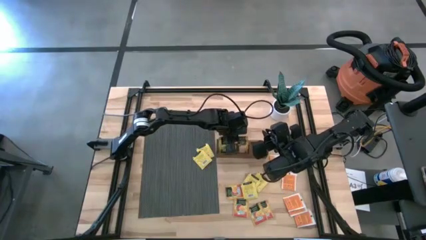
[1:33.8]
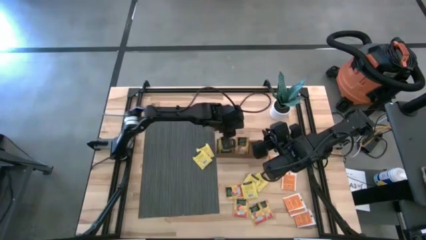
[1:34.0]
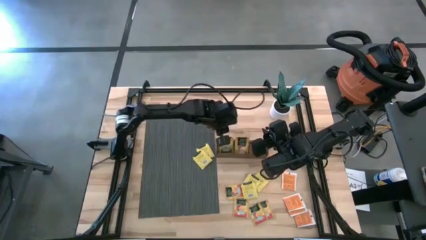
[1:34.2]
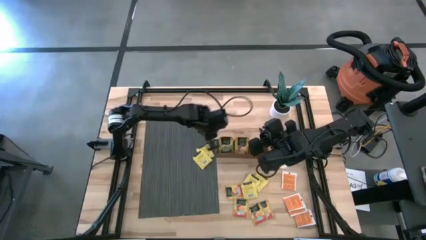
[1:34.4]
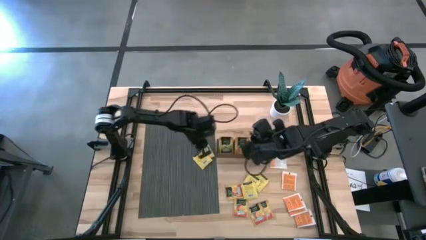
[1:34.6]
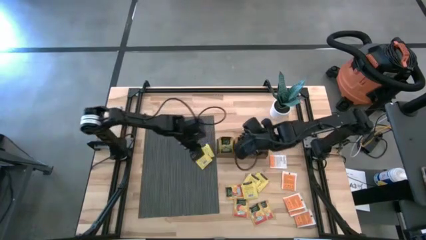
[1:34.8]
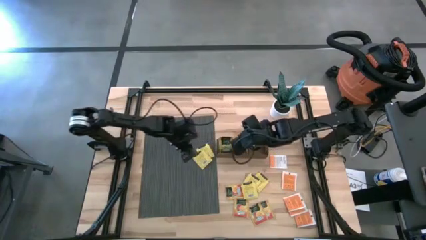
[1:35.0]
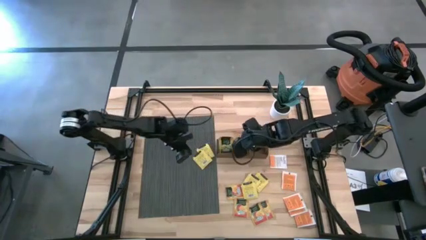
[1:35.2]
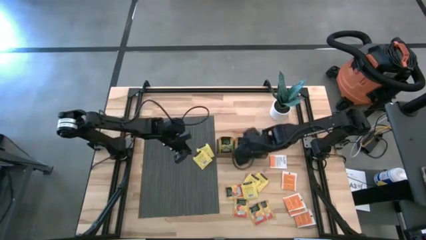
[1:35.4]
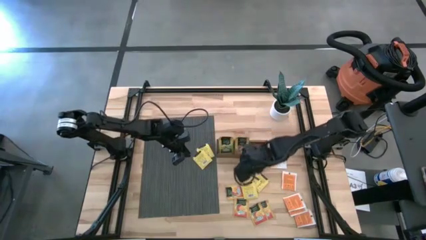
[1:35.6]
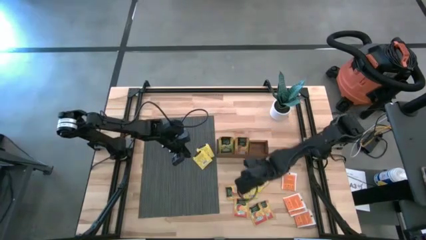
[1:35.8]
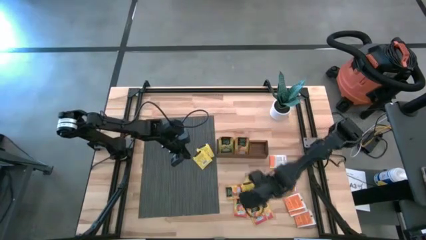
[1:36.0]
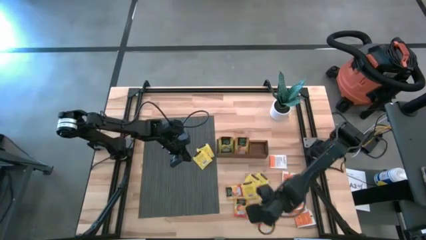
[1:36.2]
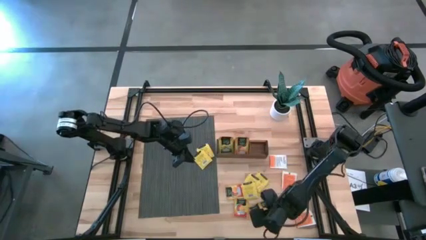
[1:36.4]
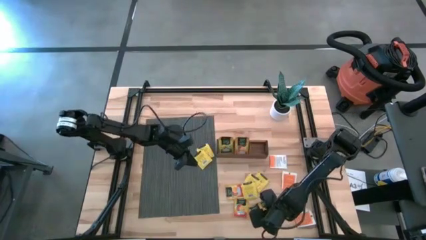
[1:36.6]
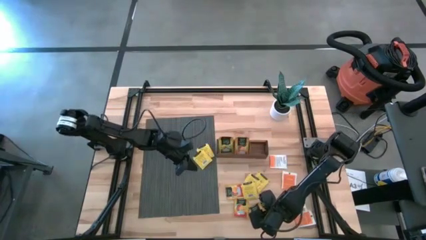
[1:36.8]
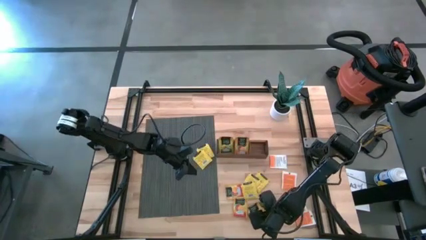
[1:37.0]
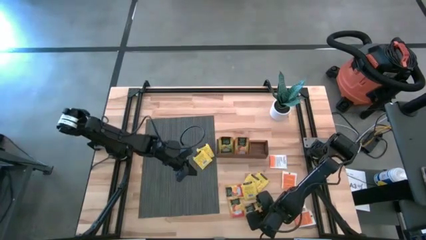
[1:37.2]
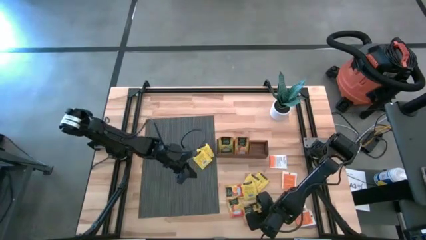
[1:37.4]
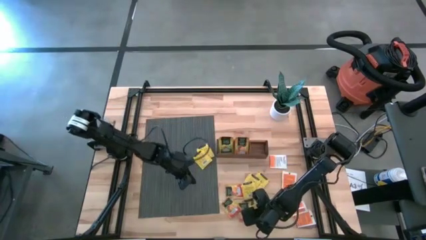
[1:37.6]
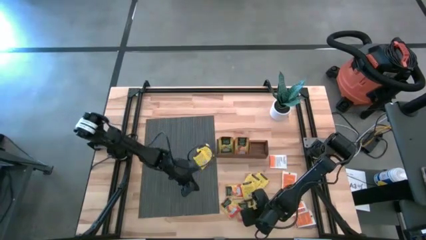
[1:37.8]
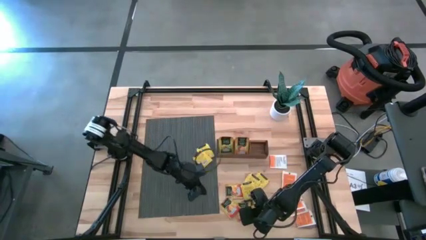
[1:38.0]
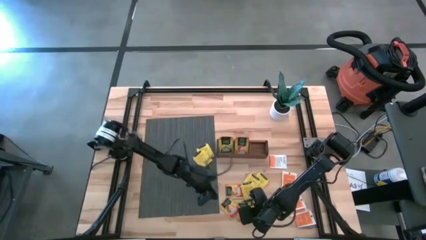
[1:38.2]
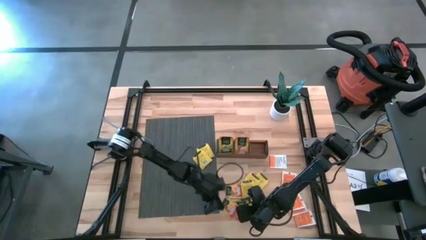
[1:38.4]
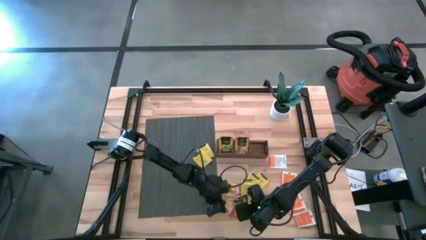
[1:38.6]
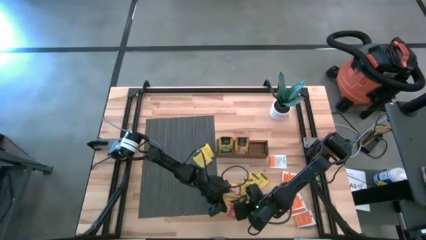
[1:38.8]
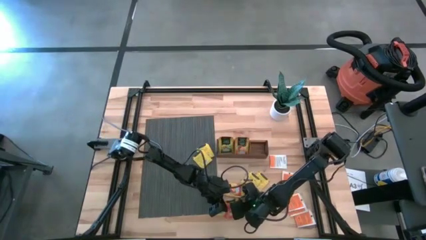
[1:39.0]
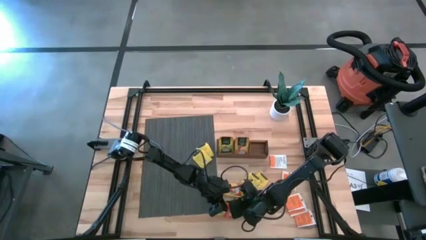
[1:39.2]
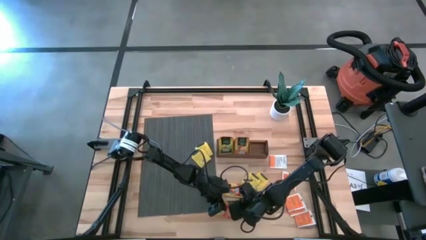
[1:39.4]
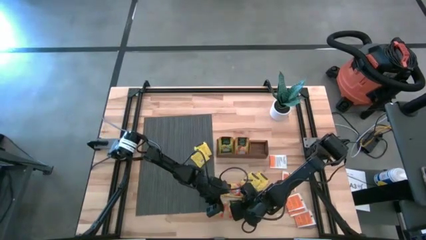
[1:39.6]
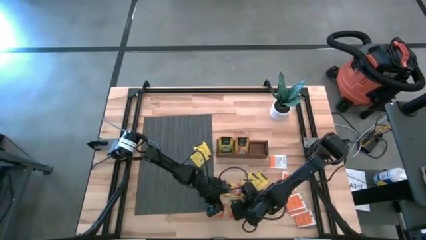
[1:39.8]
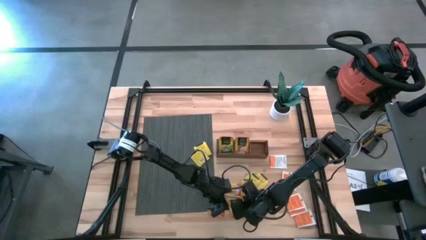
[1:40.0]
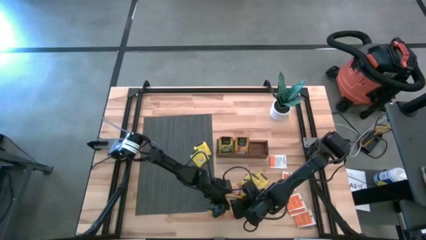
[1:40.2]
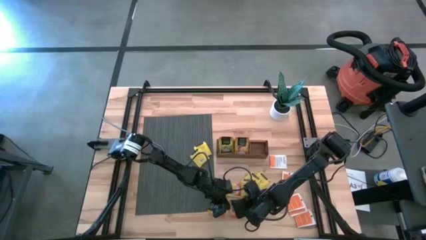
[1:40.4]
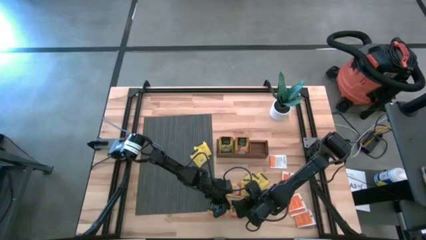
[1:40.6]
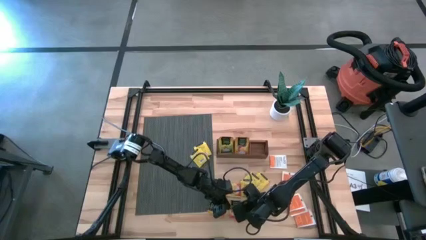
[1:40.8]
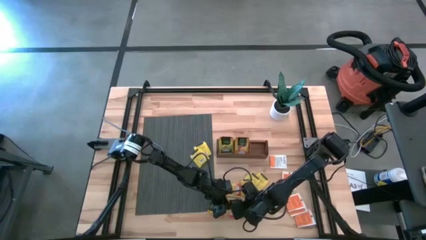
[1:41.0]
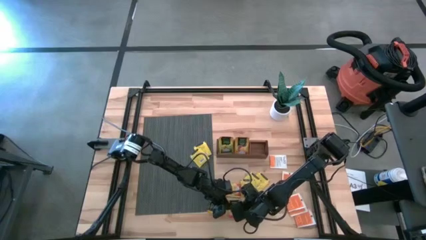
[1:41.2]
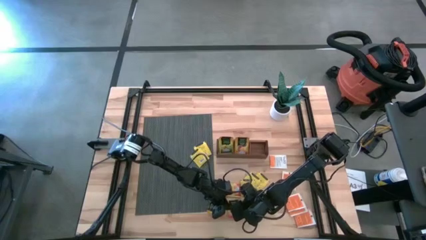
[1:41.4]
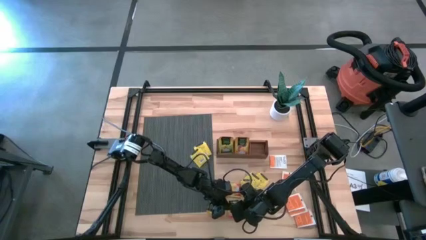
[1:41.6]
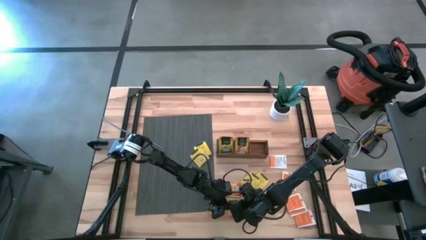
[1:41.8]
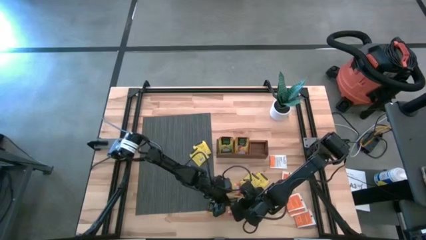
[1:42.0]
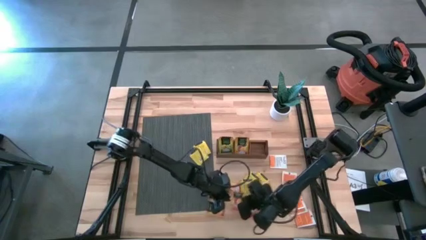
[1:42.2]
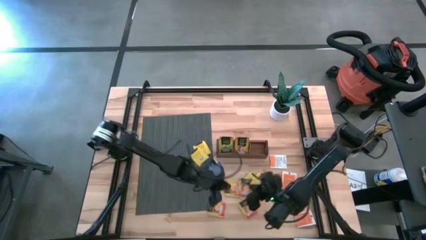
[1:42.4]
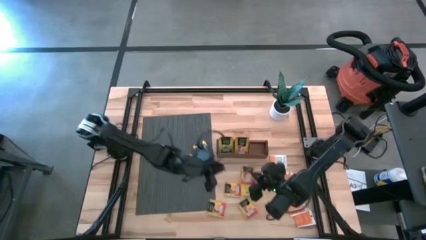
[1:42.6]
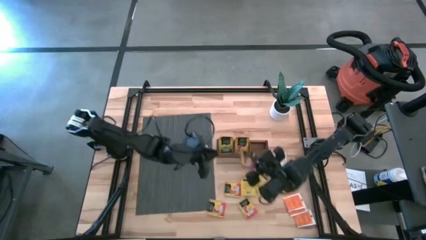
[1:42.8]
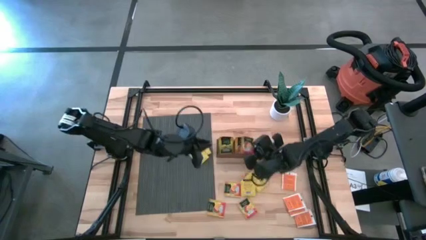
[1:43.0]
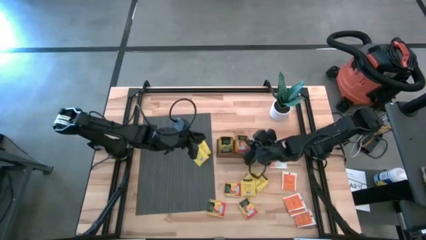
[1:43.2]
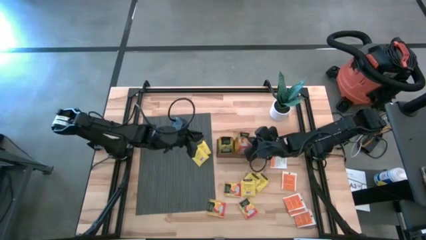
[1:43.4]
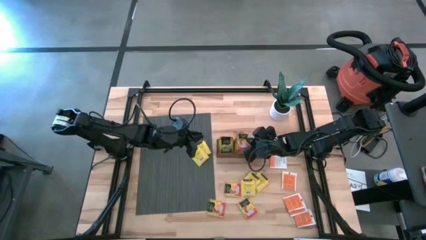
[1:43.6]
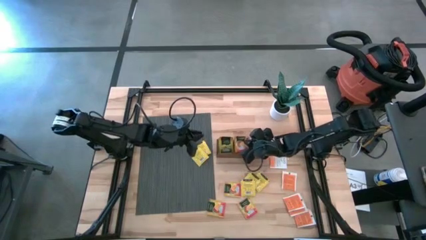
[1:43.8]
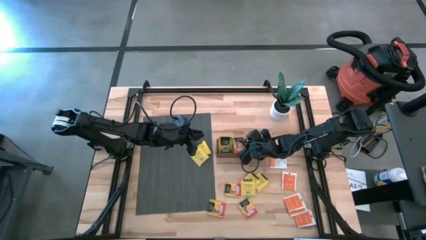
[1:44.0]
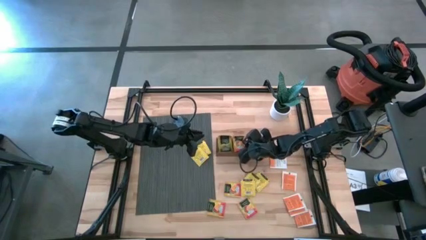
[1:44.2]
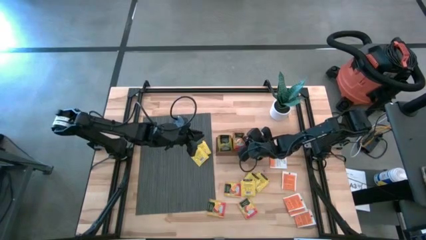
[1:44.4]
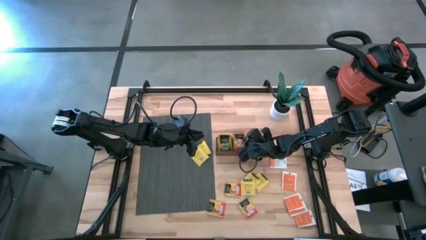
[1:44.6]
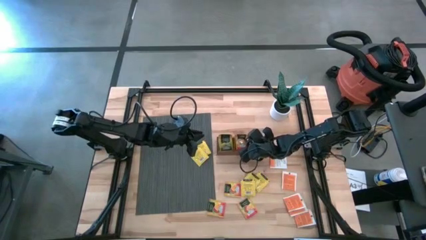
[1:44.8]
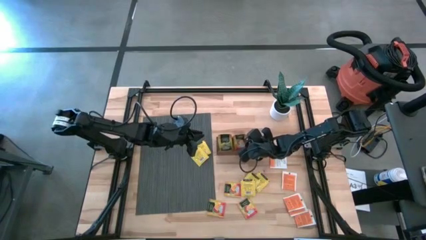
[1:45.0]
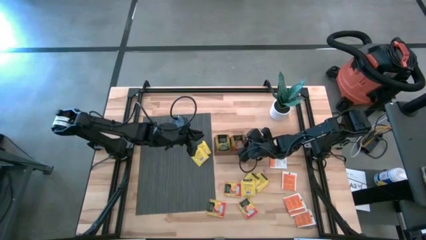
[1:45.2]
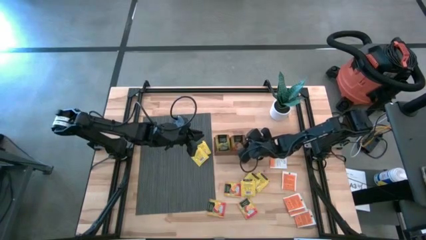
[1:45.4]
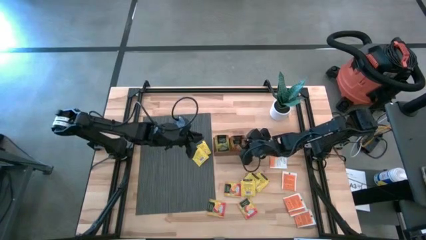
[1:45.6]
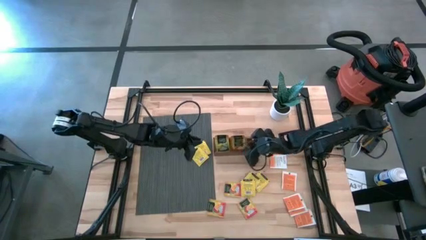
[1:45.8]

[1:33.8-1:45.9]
Task: Pick & Place Tea
Put the orange tea bag into the left section of the wooden organizer

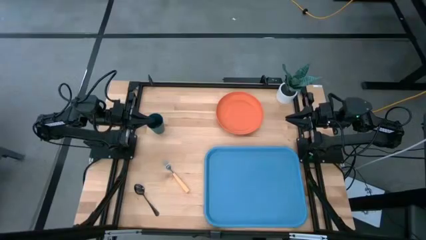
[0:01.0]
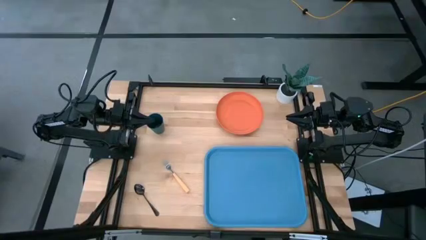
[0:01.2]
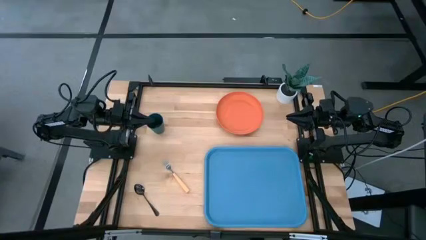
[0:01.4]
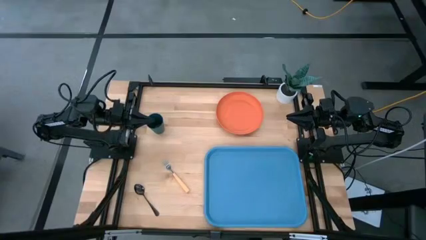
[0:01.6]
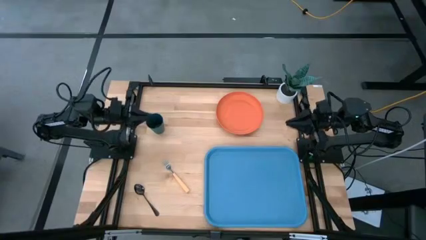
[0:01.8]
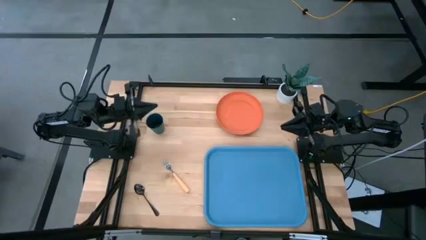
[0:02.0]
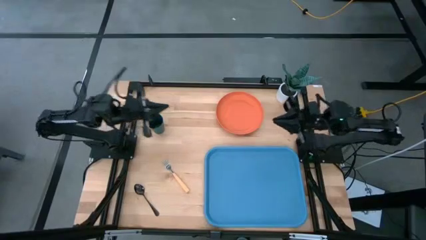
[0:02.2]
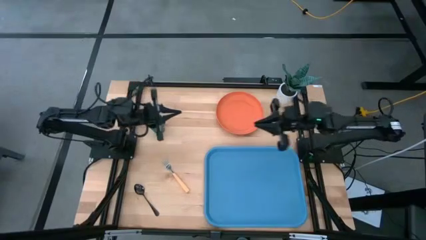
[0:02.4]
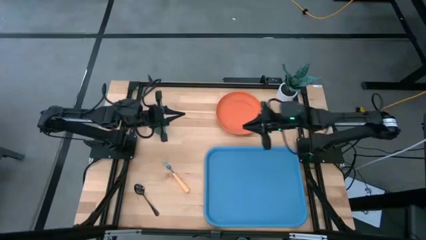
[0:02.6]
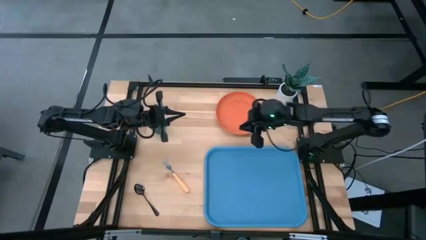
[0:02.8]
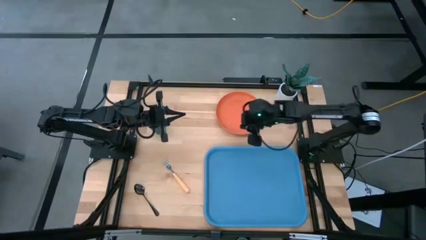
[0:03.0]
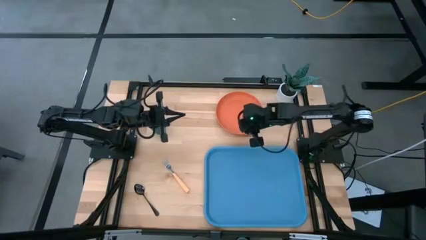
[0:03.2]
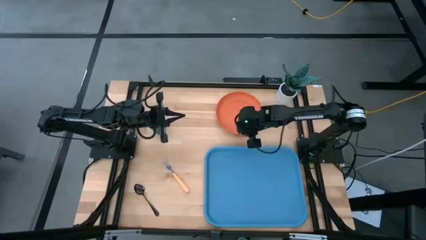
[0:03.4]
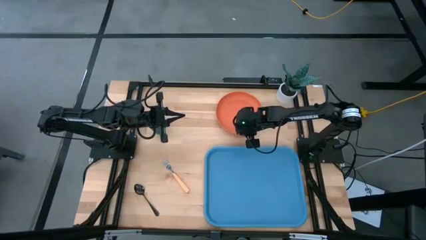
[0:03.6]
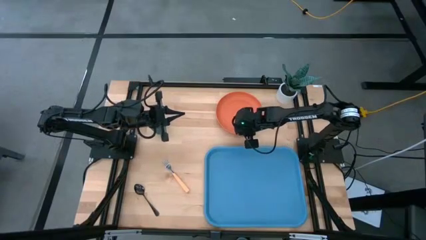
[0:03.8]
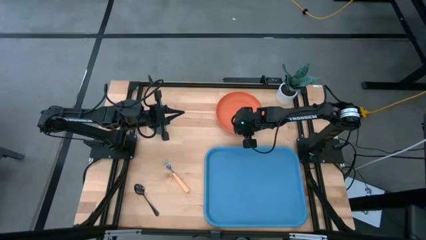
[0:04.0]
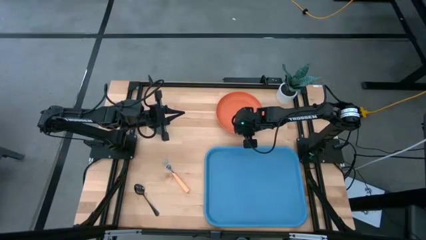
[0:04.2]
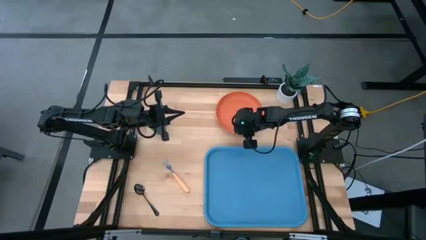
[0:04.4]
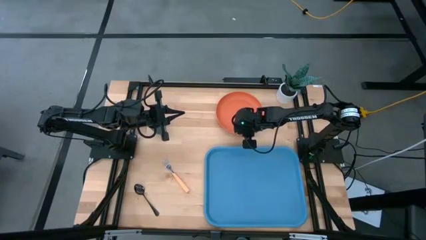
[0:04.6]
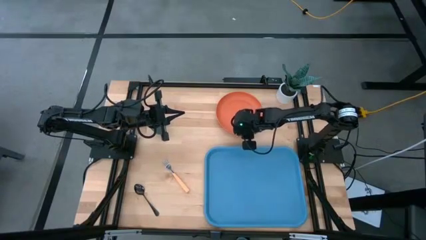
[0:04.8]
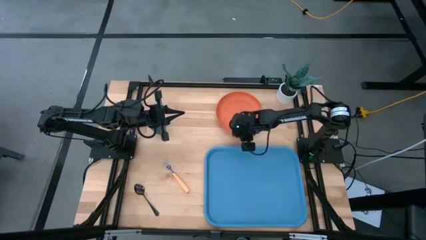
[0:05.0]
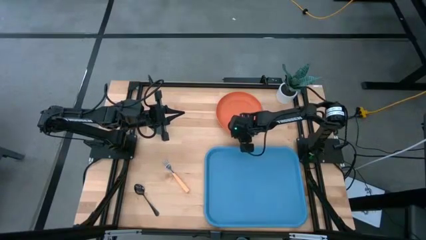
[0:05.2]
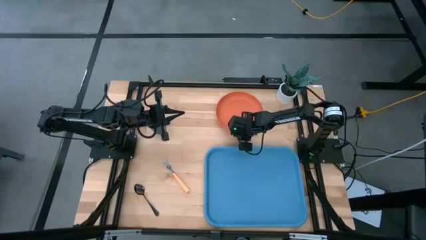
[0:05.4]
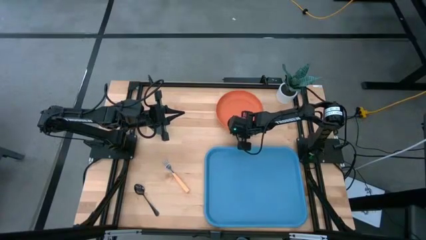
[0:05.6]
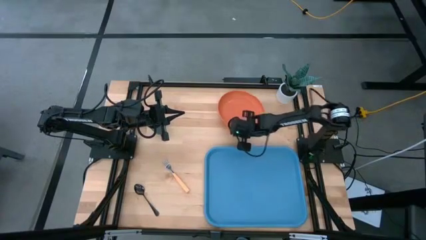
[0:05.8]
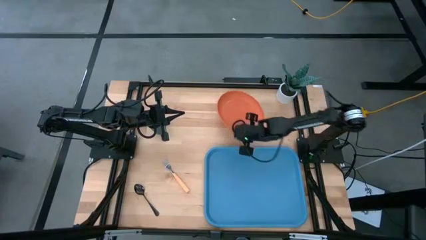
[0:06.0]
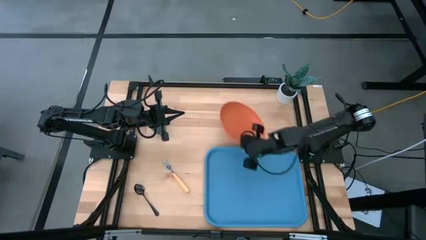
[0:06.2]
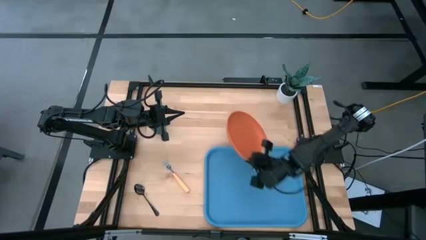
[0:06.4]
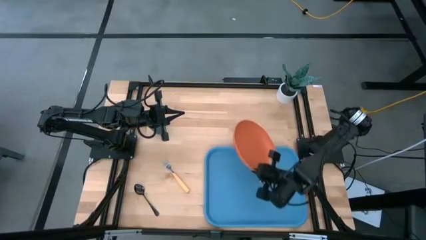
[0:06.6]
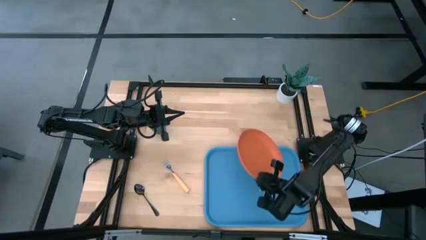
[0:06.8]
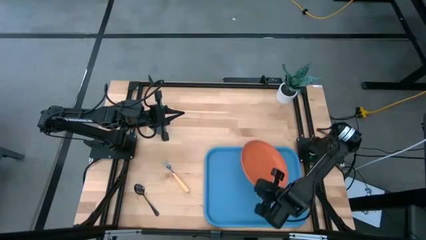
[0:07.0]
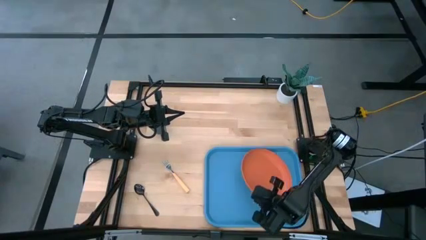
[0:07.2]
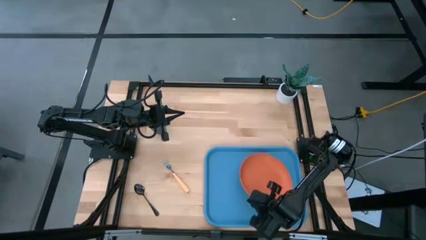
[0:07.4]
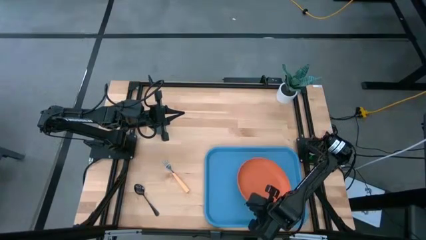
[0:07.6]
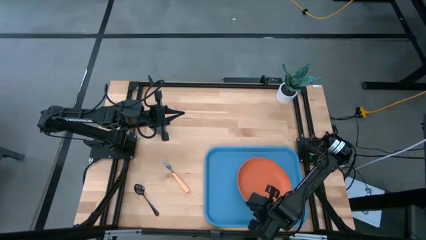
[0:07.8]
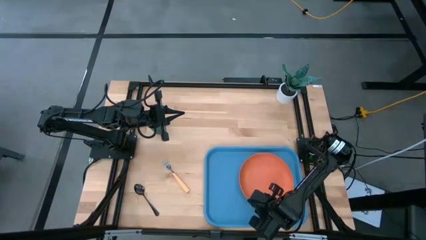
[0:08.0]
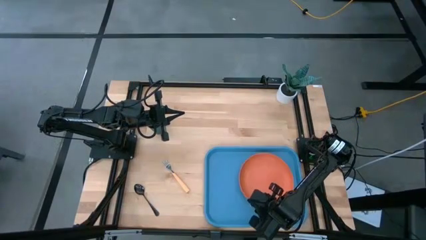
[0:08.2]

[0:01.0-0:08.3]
Task: Pick and place plate/cup/fork/spoon on tray
Put the orange plate on the top right of the blue serving tray
